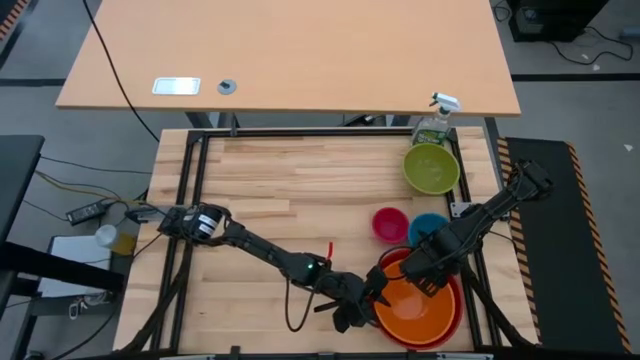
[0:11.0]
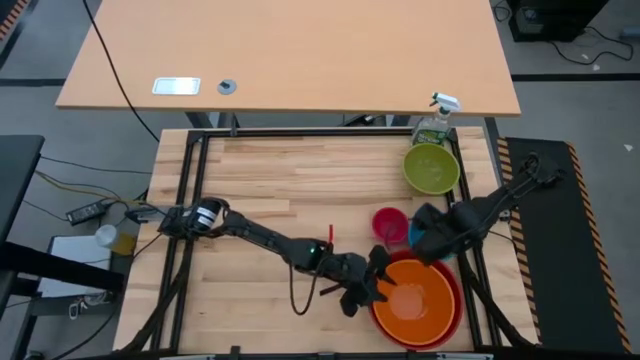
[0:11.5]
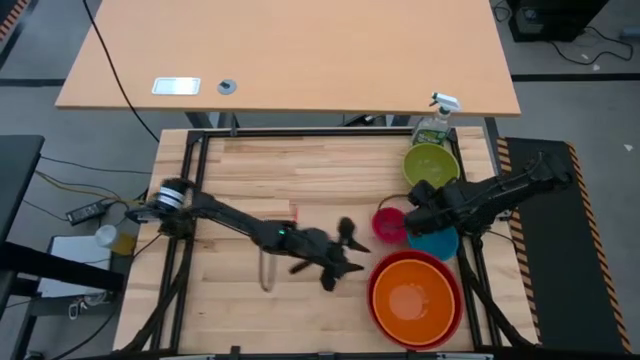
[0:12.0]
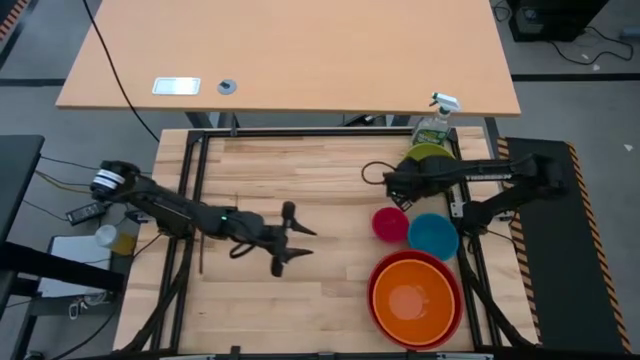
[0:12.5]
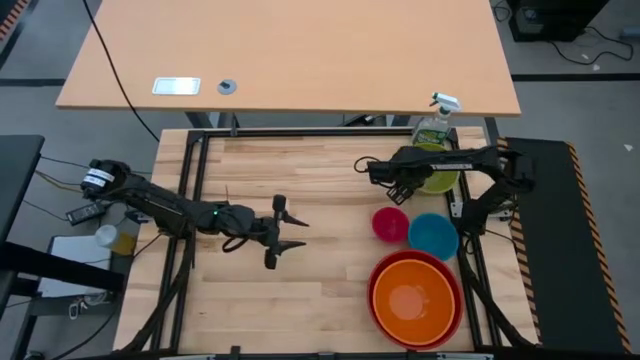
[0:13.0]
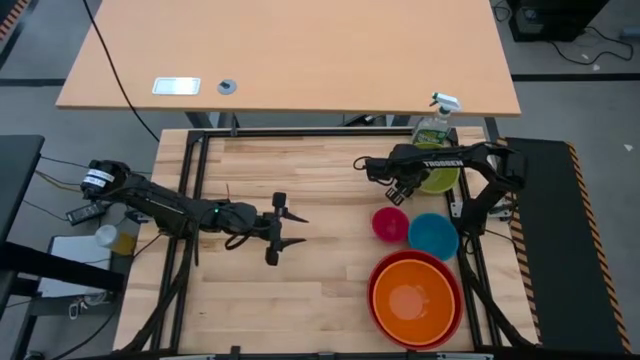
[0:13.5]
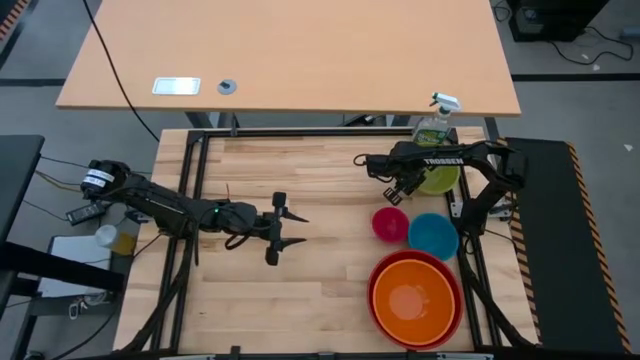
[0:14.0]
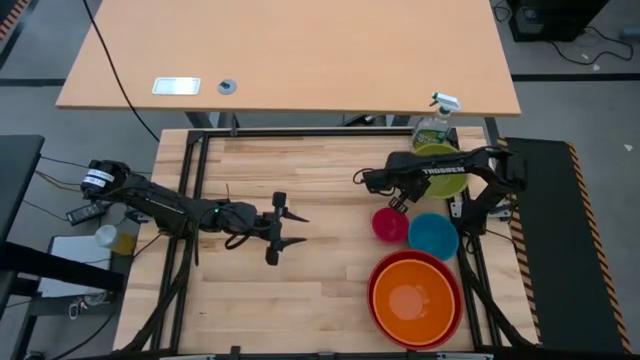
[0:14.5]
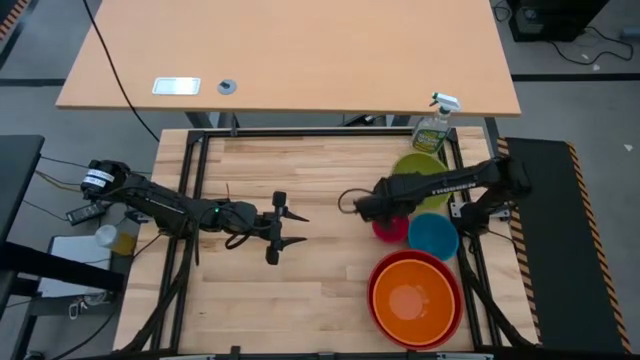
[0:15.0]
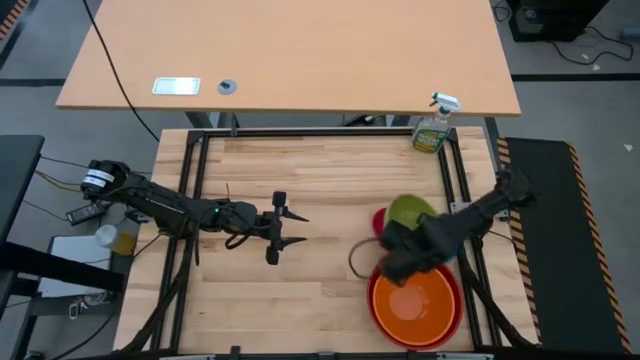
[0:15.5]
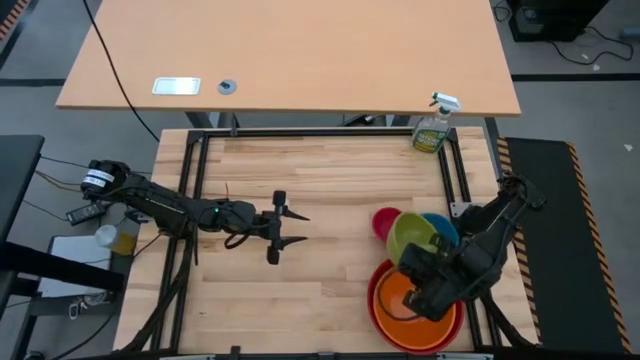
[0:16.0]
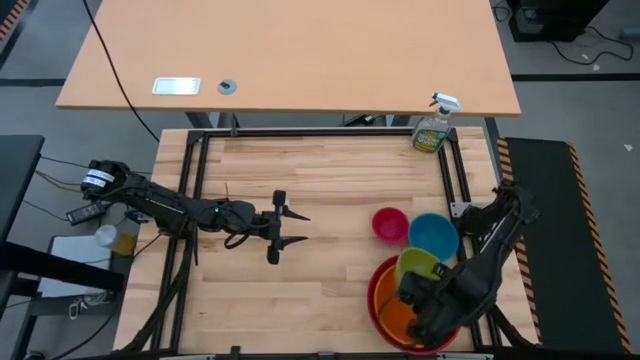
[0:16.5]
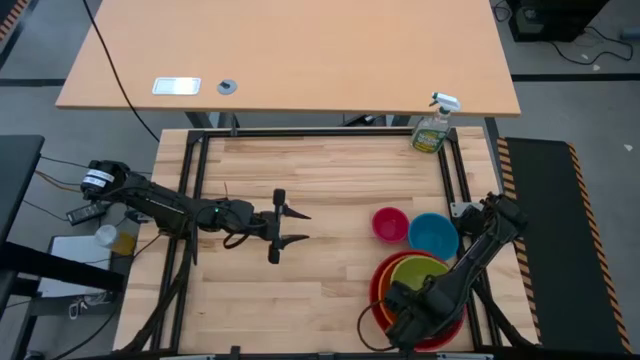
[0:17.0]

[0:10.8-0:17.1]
Stack the green bowl on the orange bowl

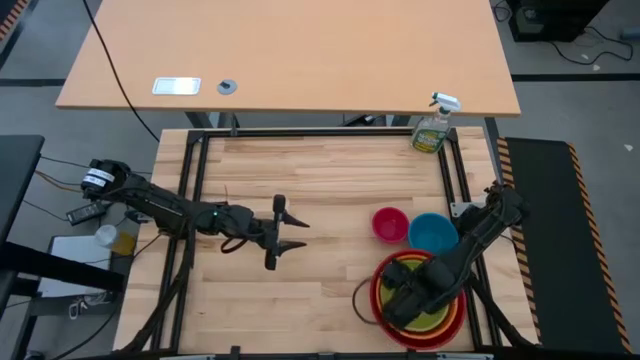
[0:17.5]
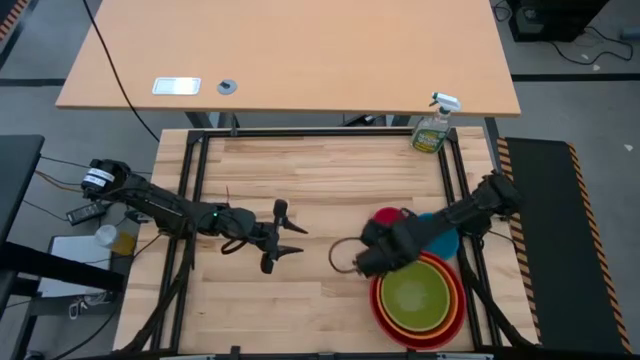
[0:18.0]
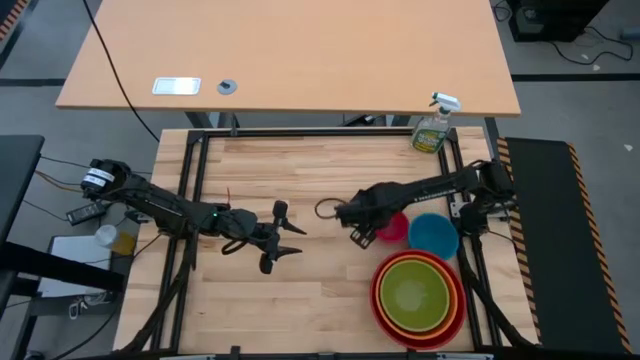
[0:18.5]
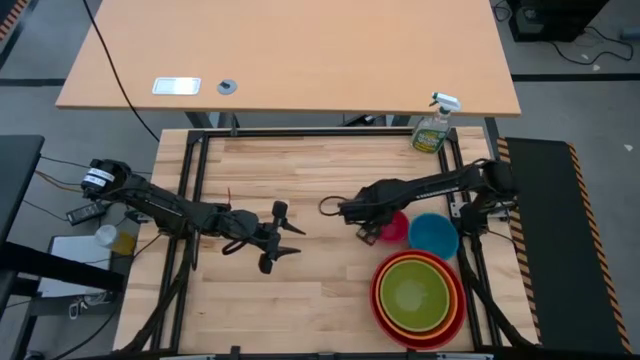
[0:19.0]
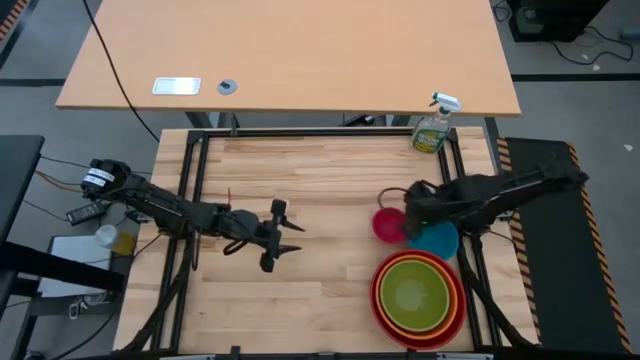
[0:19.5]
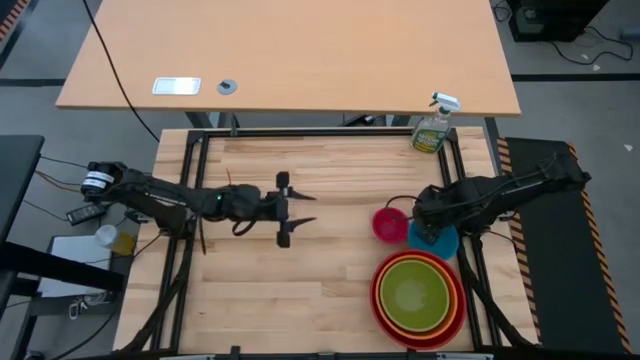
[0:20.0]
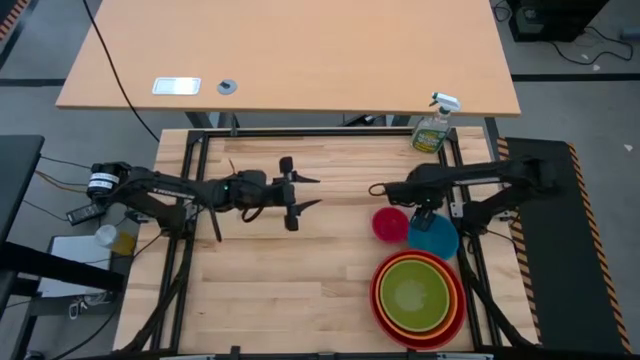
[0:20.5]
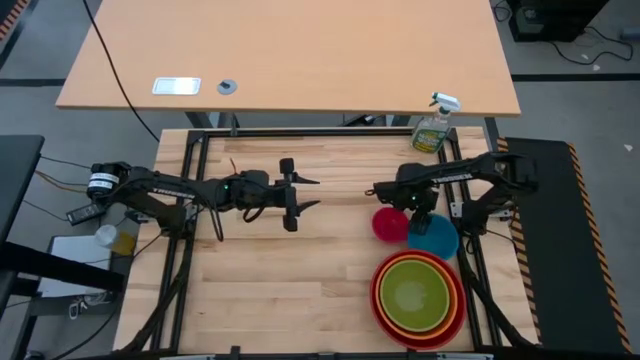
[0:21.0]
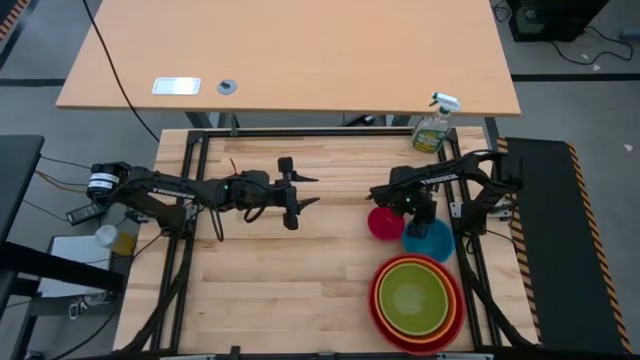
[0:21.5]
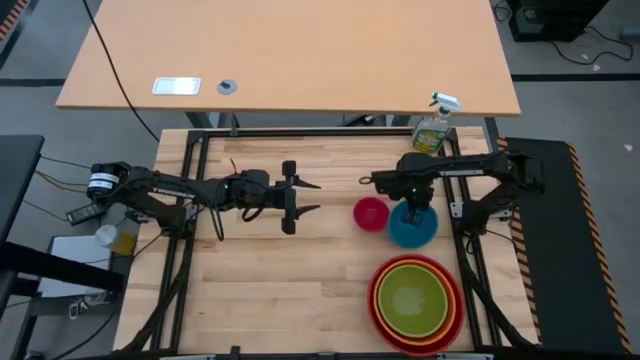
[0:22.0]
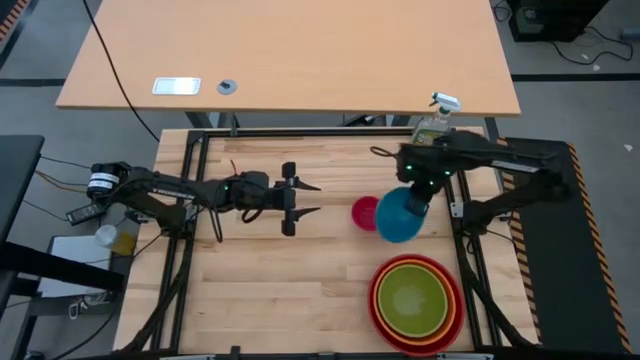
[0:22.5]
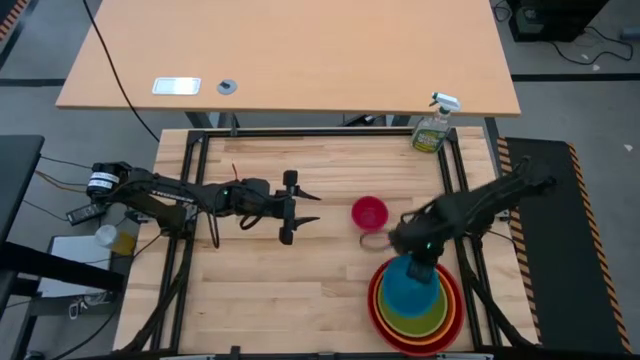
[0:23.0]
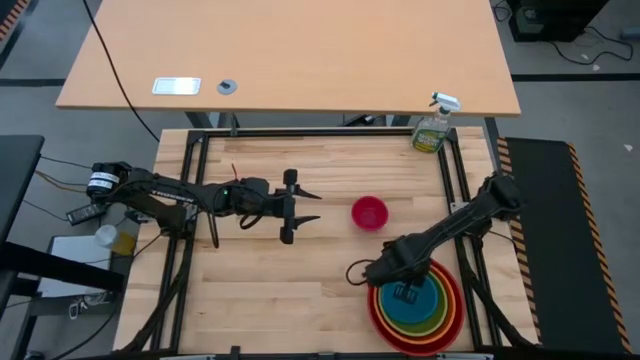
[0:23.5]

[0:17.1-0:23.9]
Stack the blue bowl on the green bowl

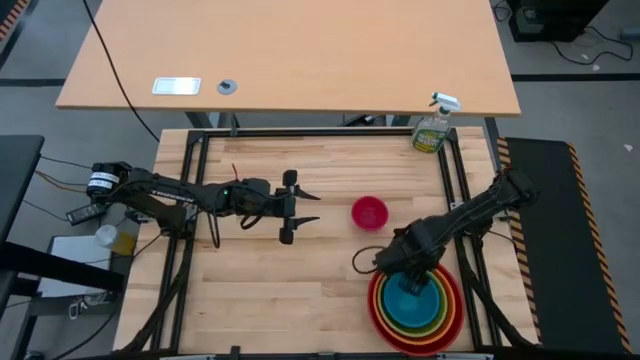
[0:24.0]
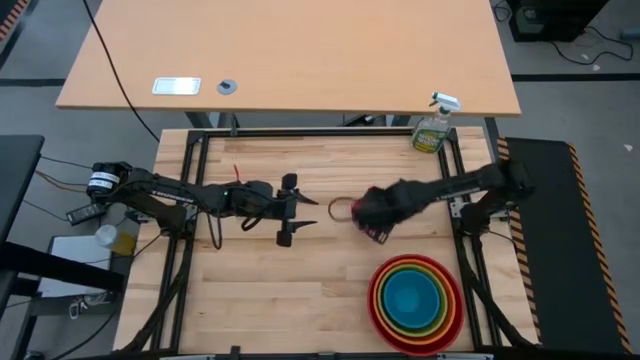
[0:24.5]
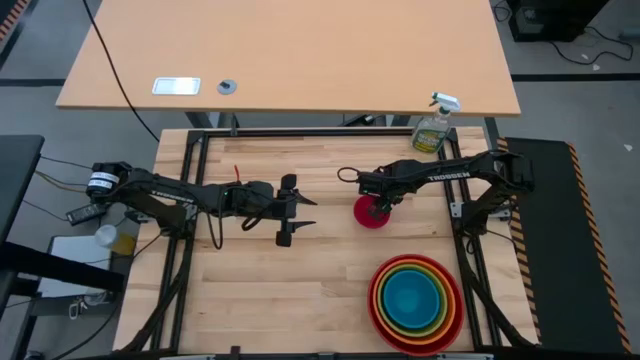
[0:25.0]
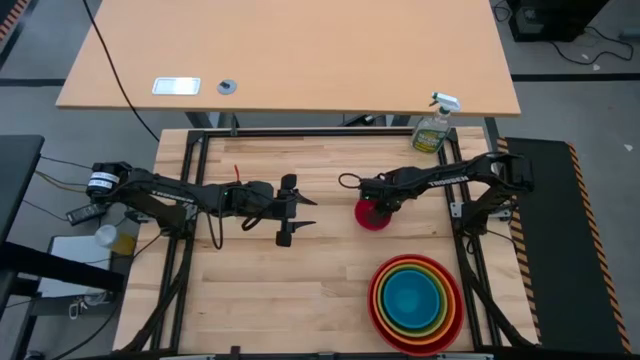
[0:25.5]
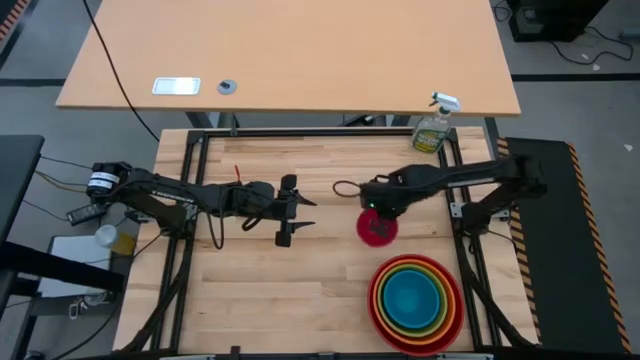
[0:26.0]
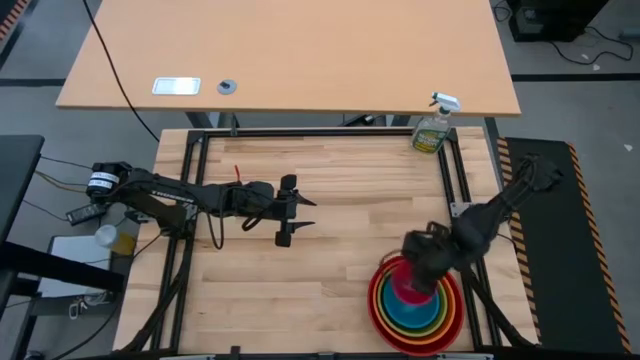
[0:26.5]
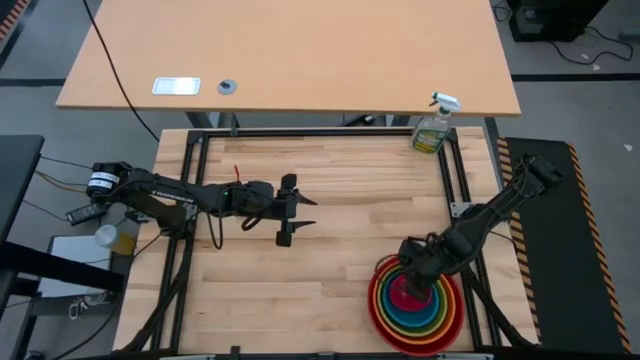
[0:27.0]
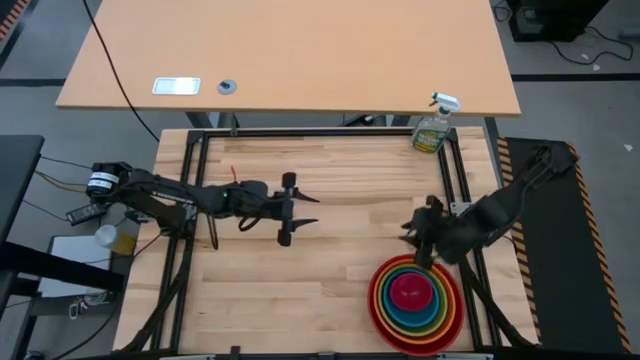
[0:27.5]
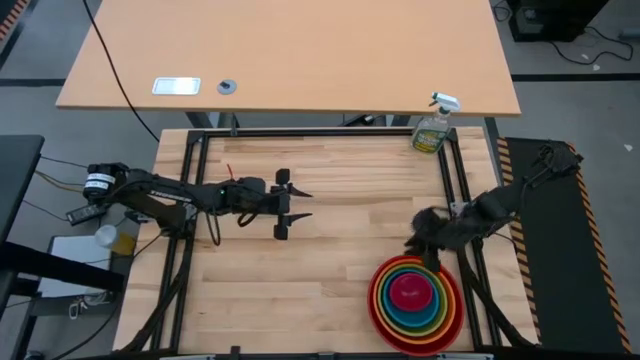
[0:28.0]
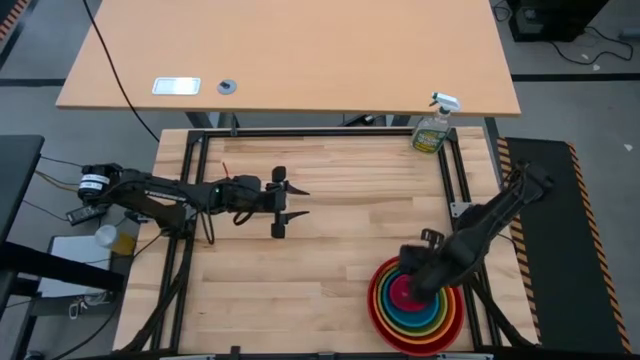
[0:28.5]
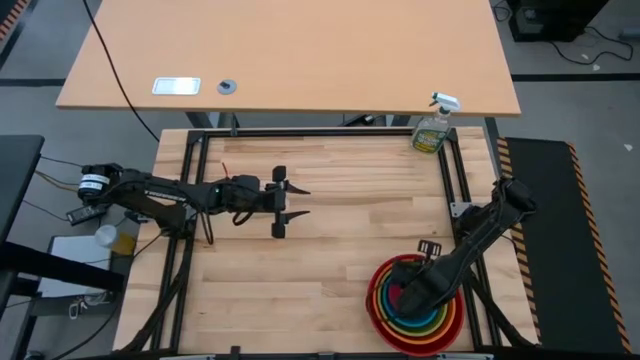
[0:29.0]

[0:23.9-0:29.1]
Stack the pink bowl on the blue bowl
